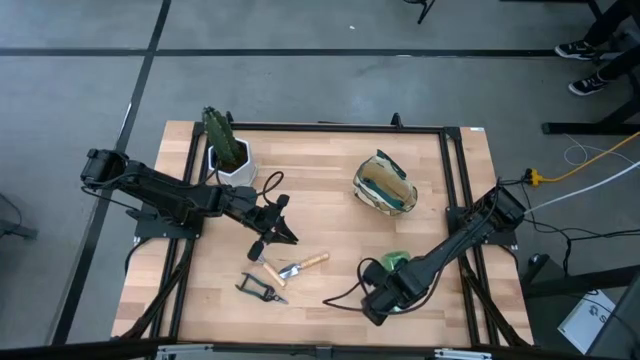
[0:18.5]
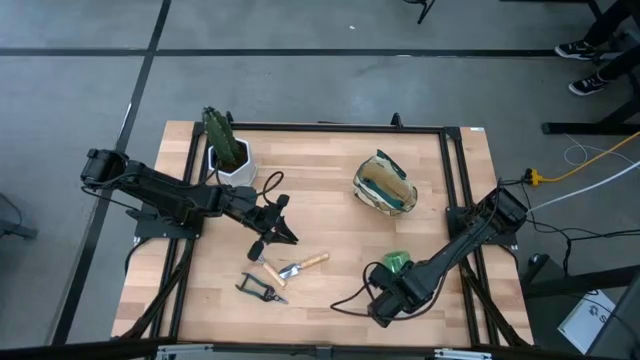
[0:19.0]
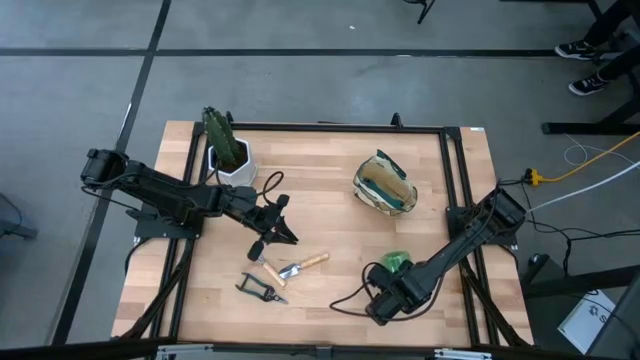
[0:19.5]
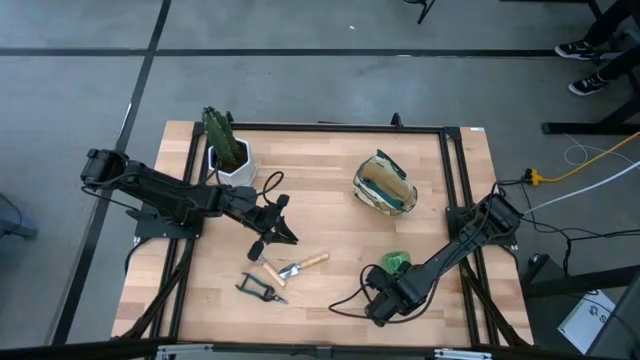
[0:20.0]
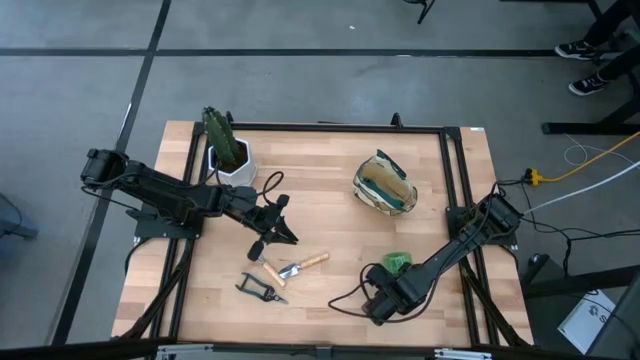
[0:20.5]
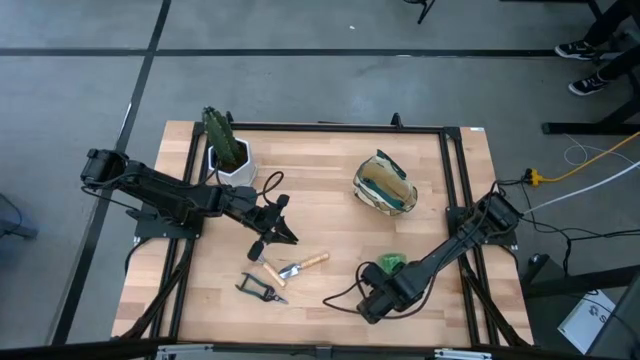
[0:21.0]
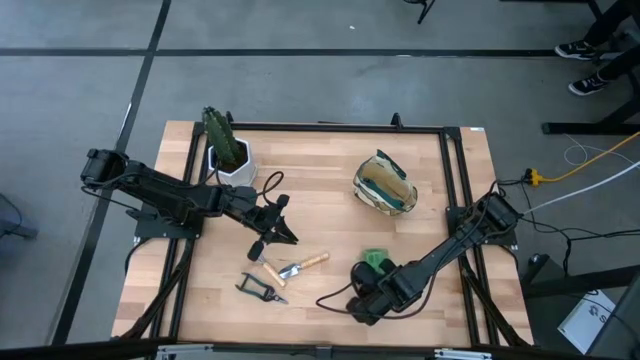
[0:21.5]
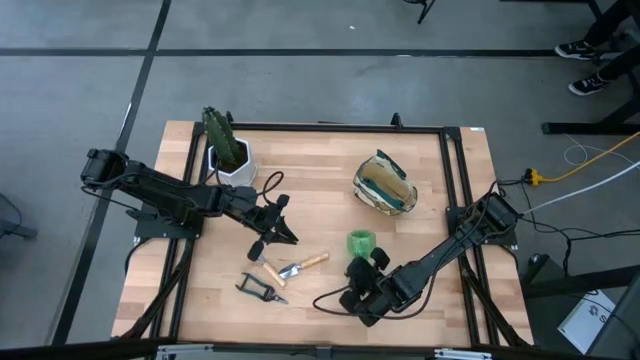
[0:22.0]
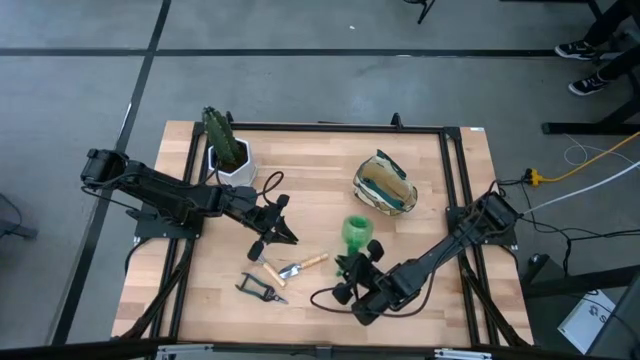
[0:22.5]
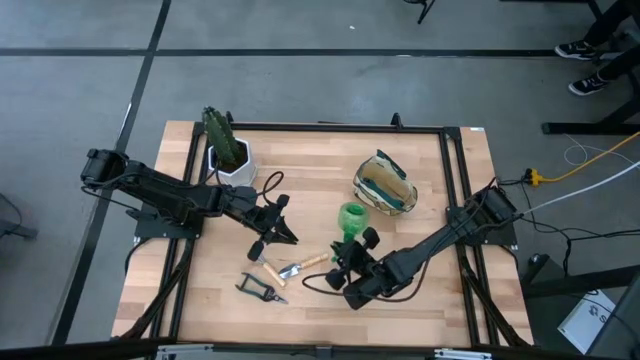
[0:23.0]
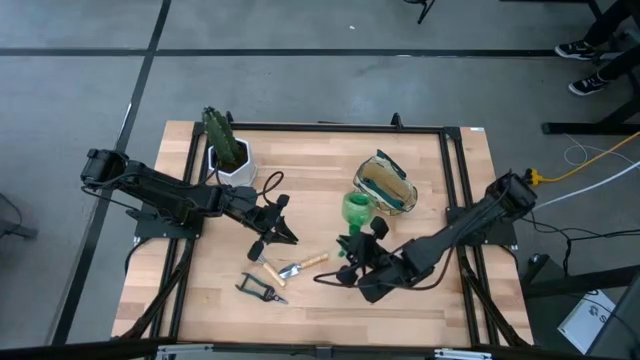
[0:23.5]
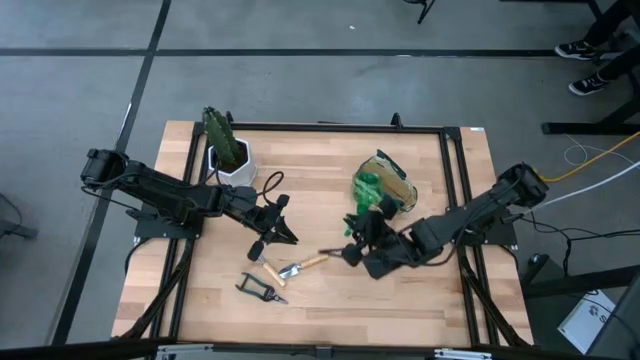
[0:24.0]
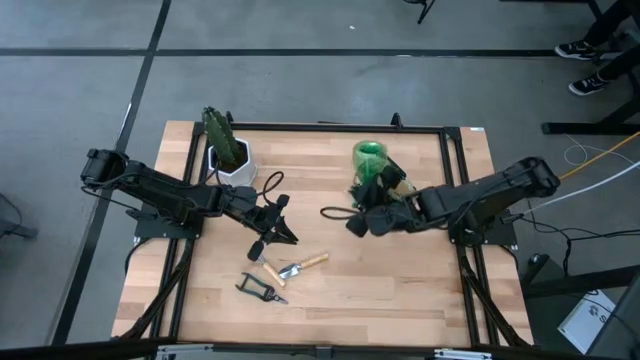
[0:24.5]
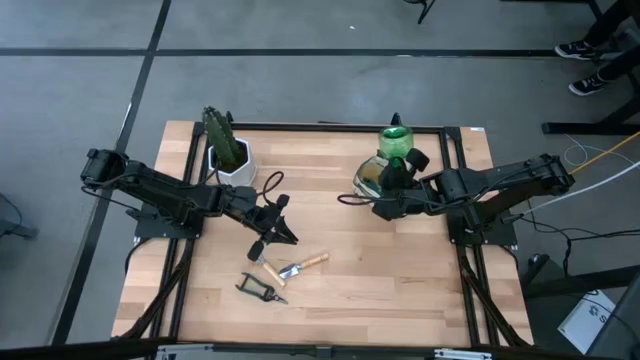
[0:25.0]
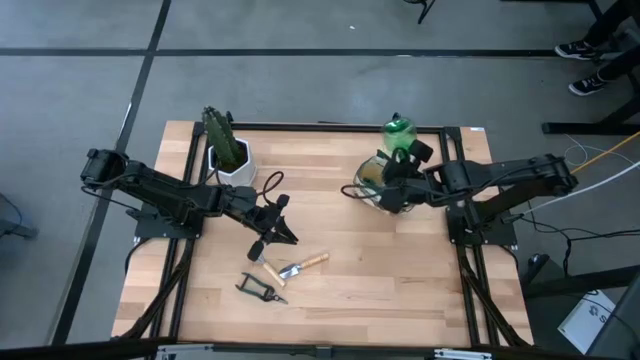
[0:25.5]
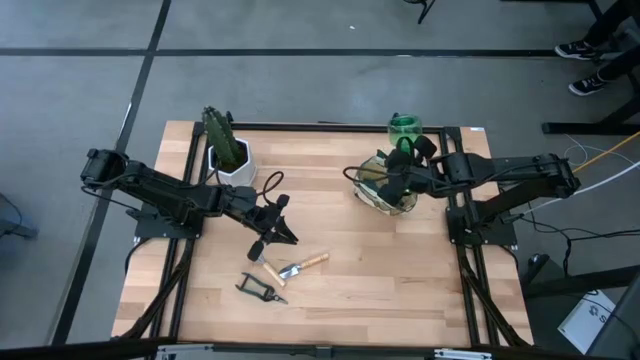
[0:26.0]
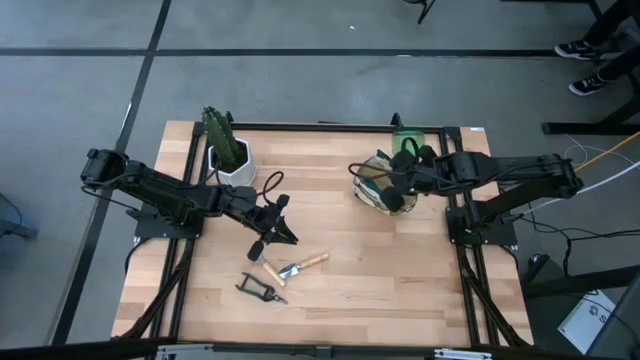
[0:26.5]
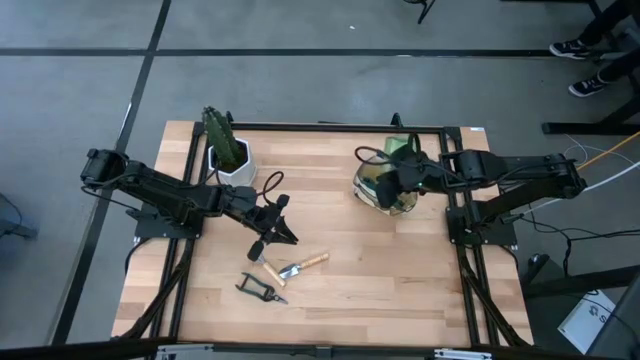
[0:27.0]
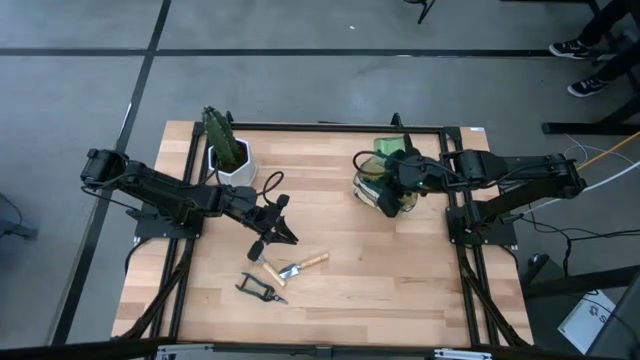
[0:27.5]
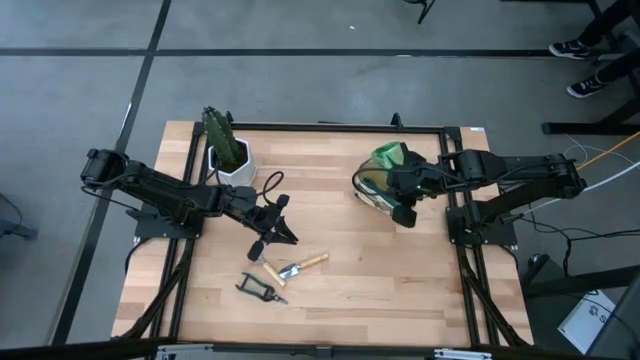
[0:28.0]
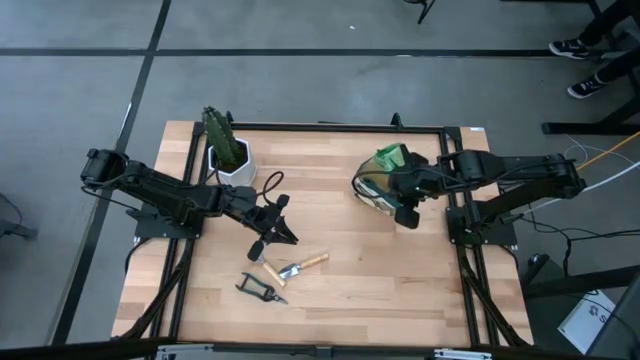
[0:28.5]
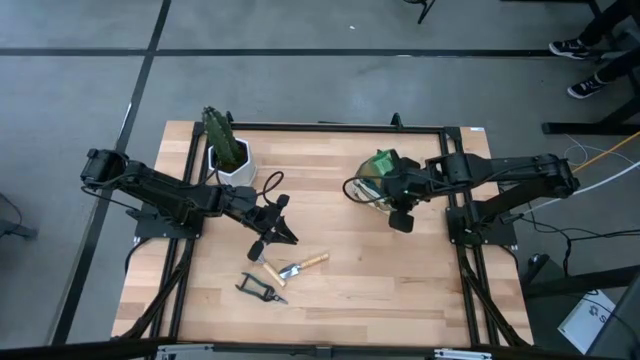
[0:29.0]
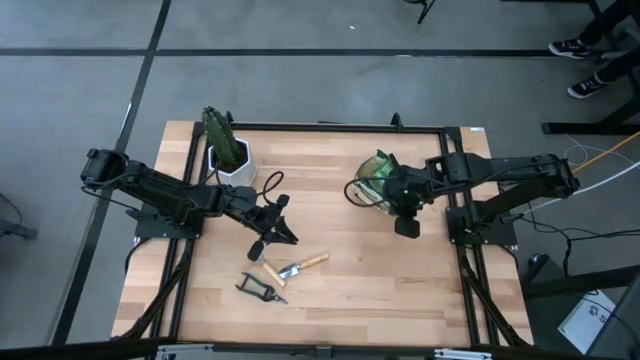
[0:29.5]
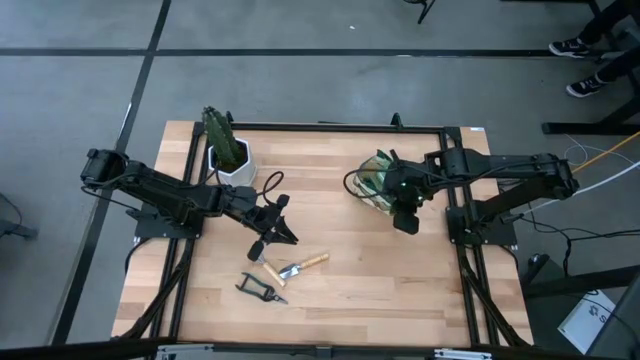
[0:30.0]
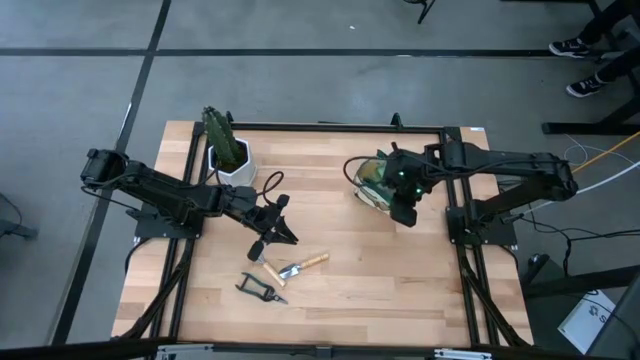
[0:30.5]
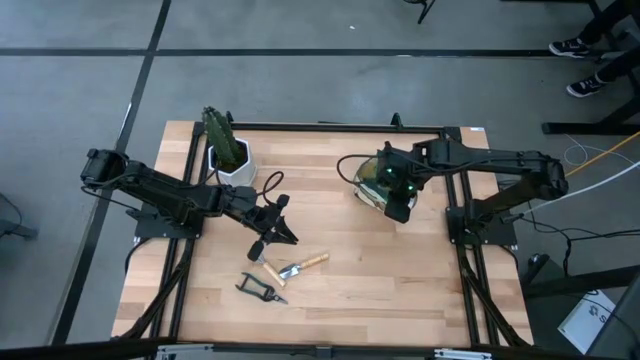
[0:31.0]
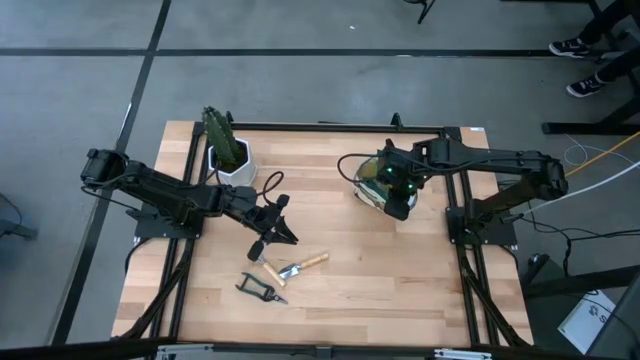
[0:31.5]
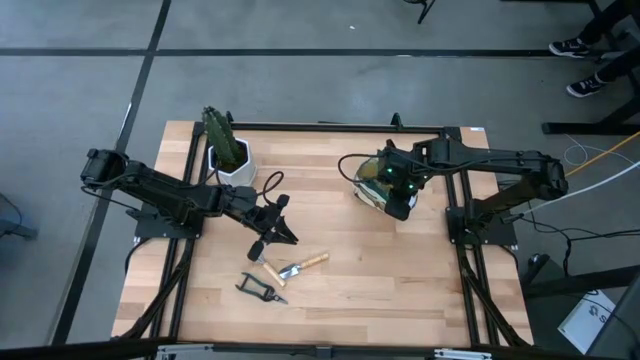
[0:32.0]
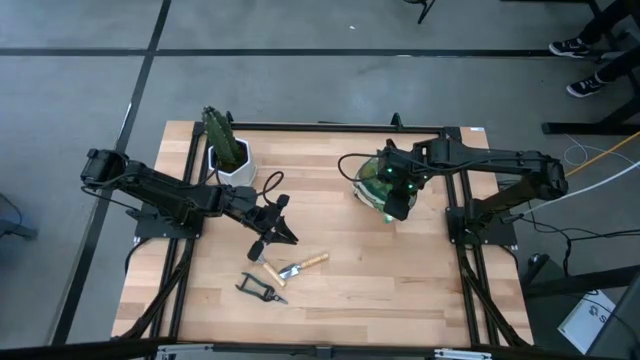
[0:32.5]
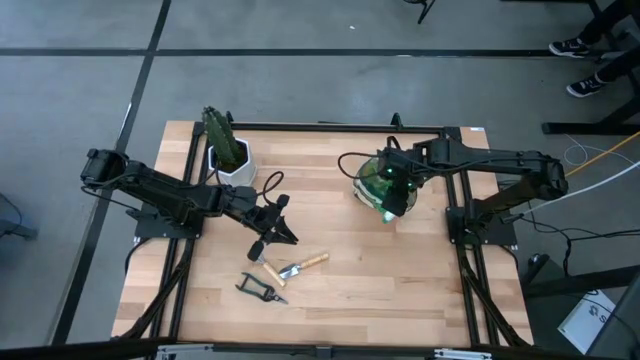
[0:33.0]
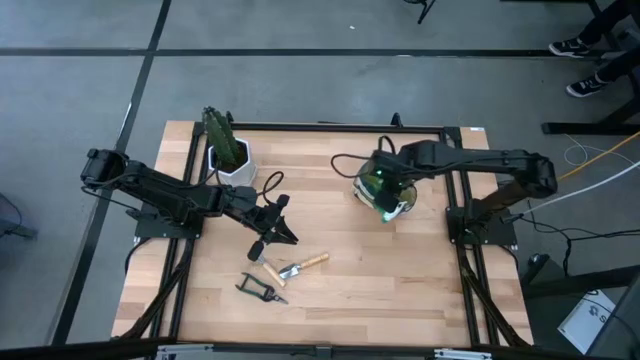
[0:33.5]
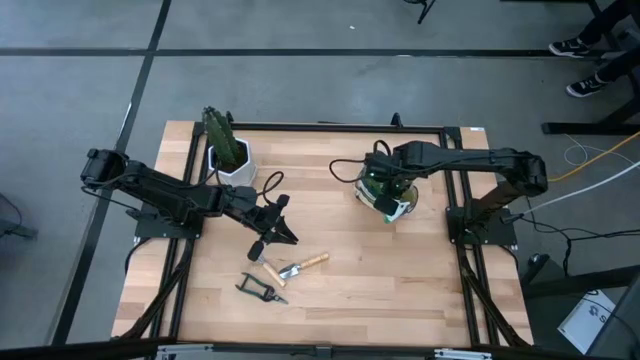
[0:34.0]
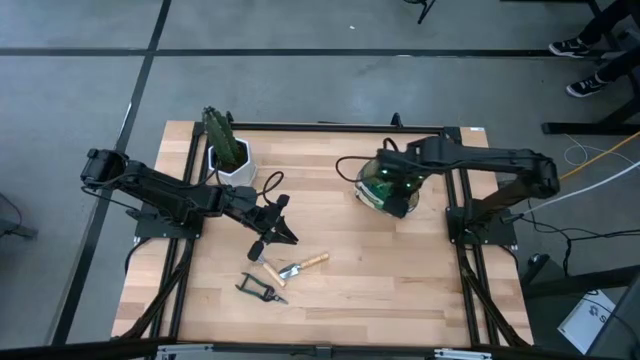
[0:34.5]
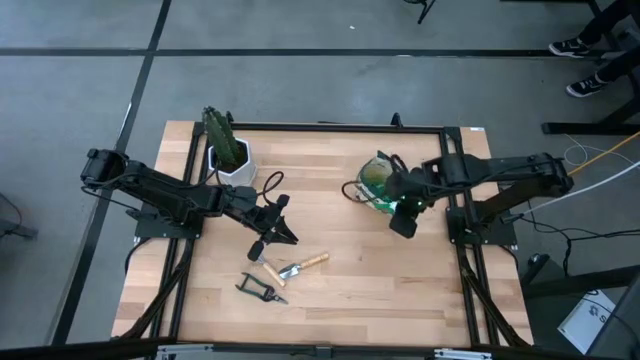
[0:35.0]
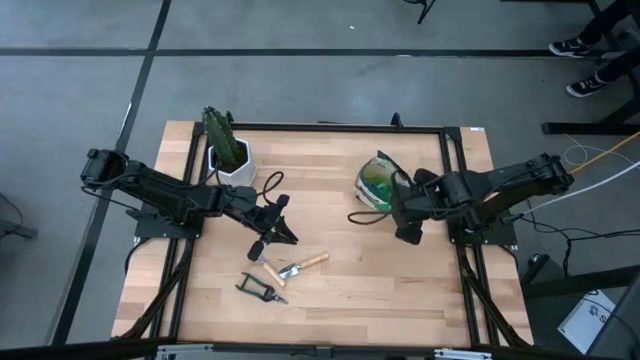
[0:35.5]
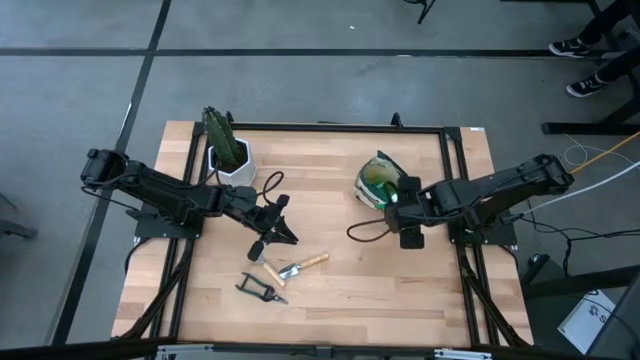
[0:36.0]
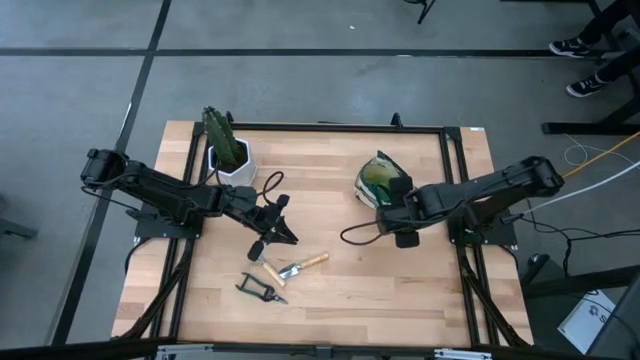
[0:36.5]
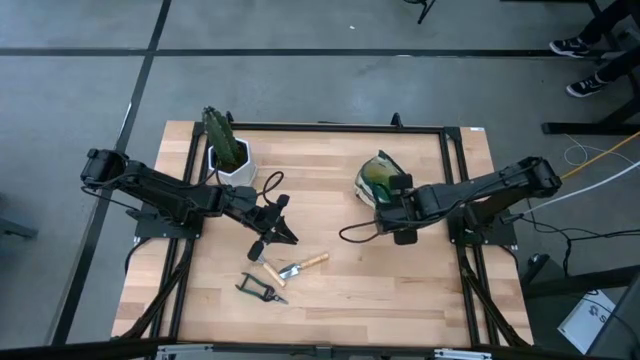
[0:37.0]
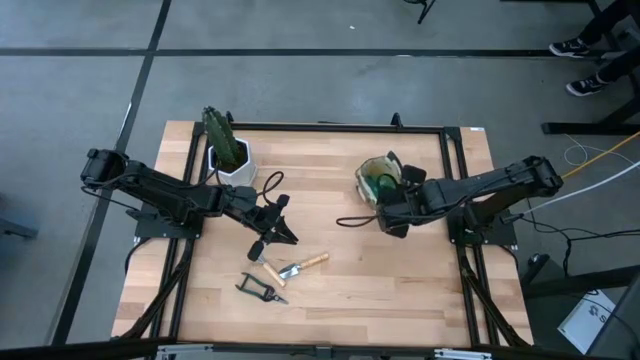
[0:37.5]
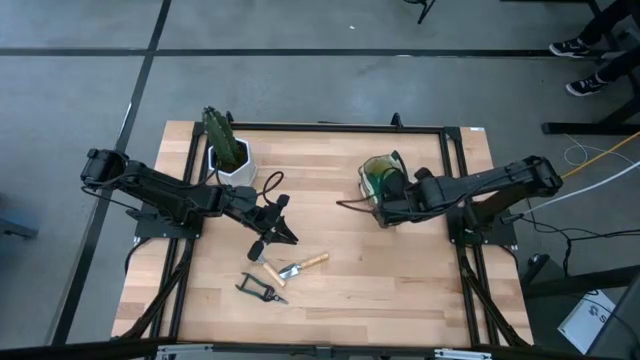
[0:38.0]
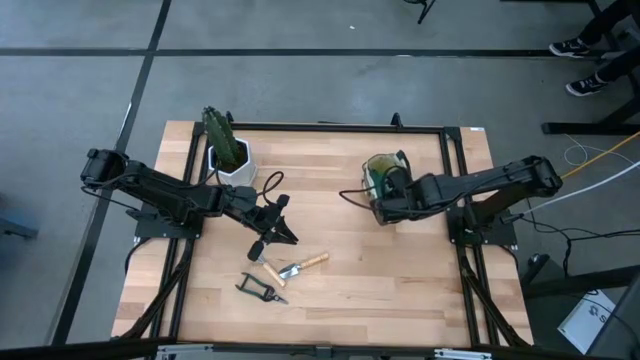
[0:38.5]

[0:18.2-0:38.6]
Task: Pick & Place Garden tools in Gardening bag
Put the spray bottle into the gardening bag
